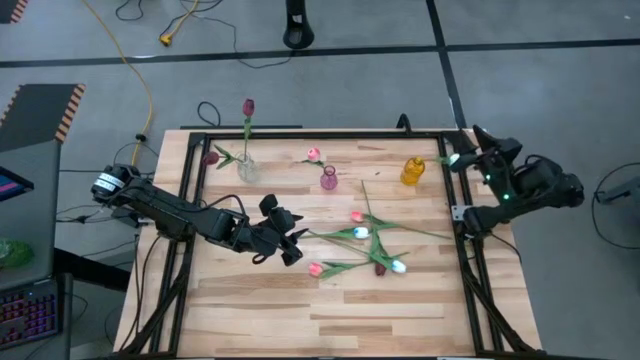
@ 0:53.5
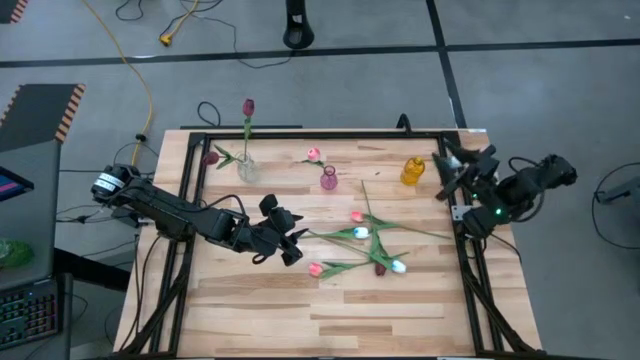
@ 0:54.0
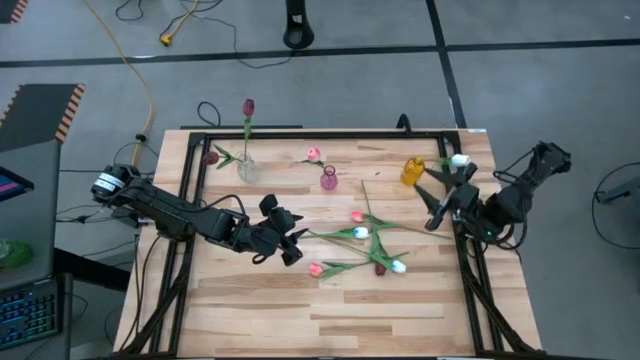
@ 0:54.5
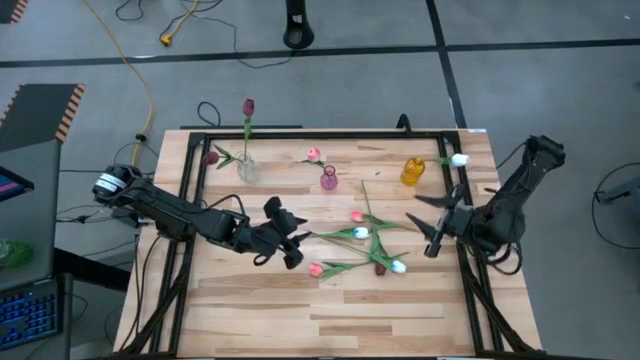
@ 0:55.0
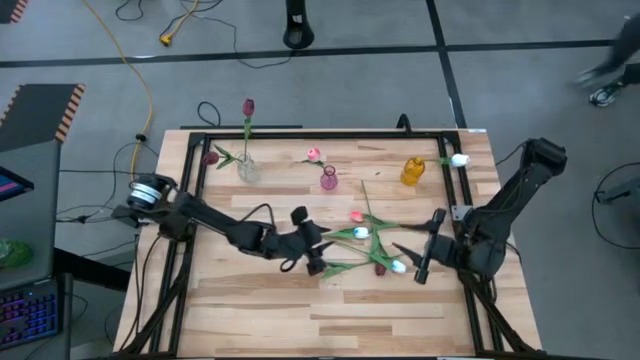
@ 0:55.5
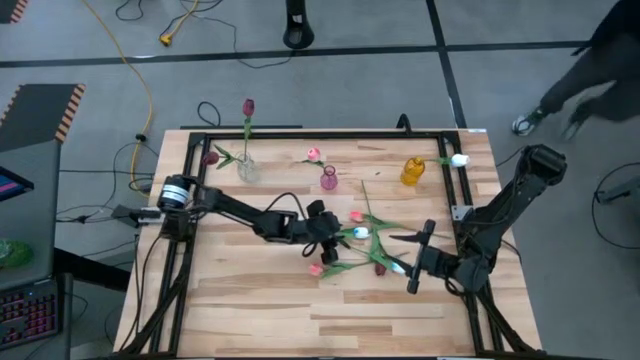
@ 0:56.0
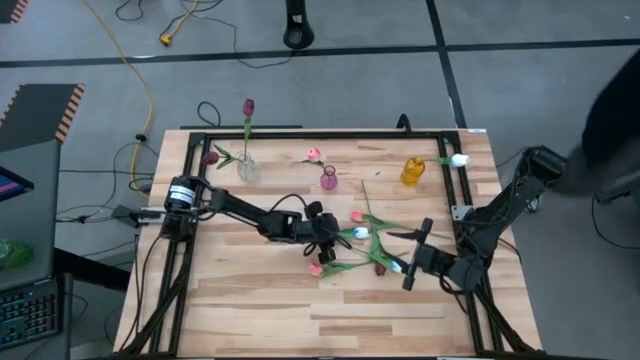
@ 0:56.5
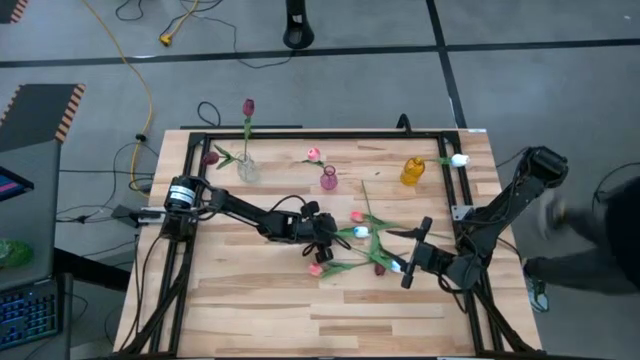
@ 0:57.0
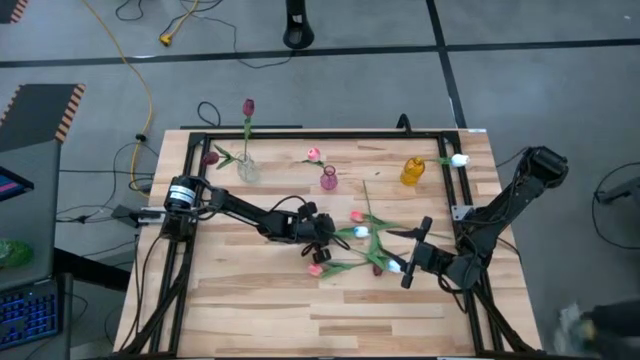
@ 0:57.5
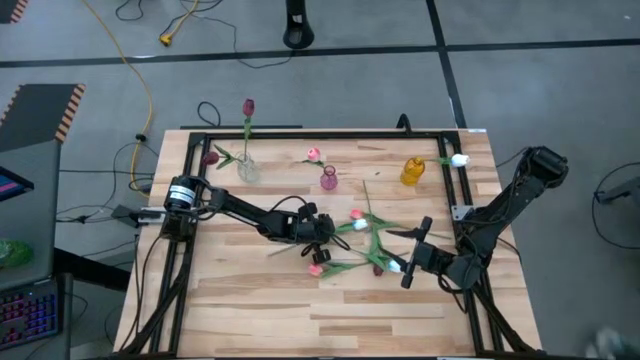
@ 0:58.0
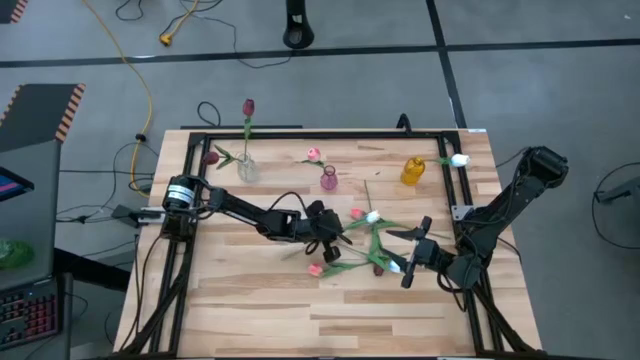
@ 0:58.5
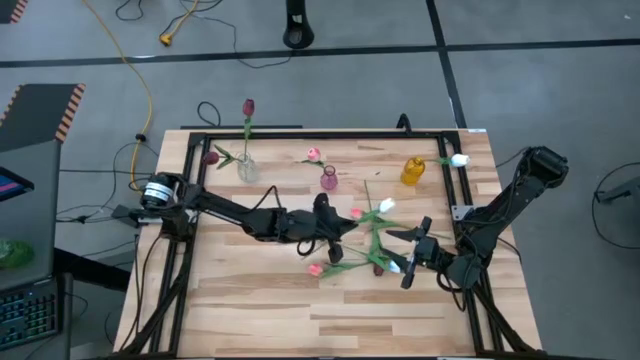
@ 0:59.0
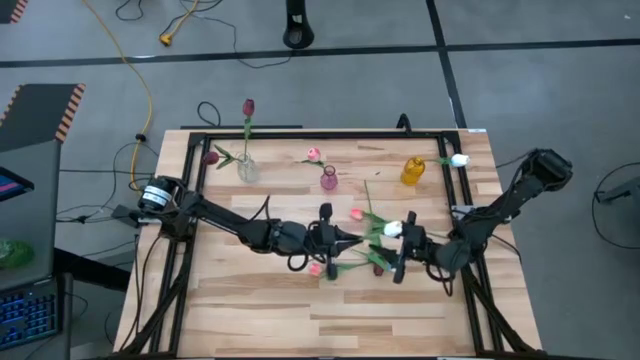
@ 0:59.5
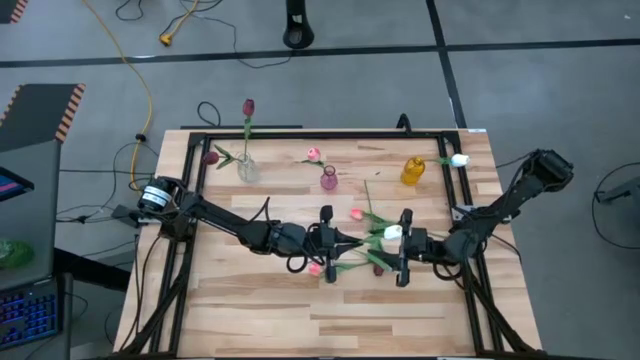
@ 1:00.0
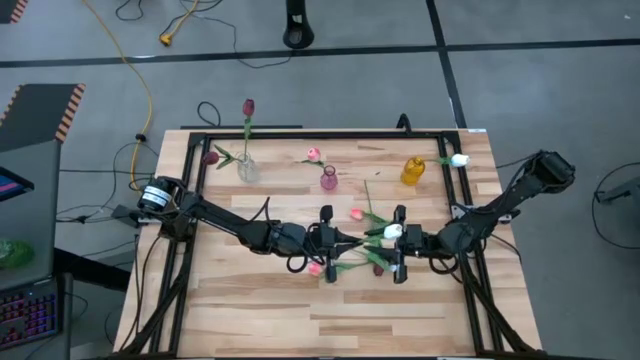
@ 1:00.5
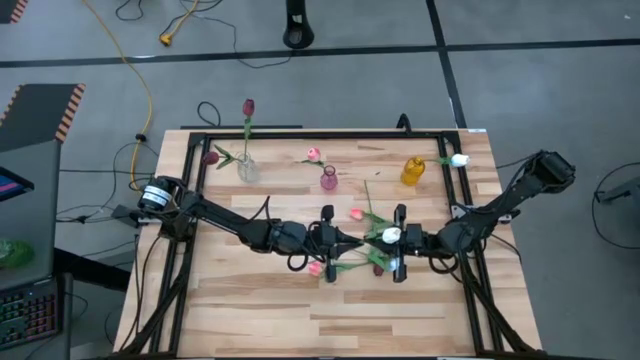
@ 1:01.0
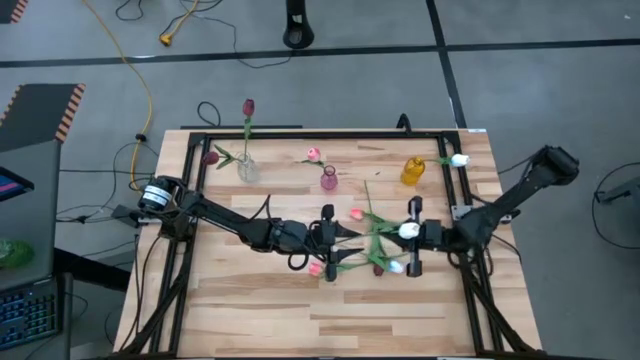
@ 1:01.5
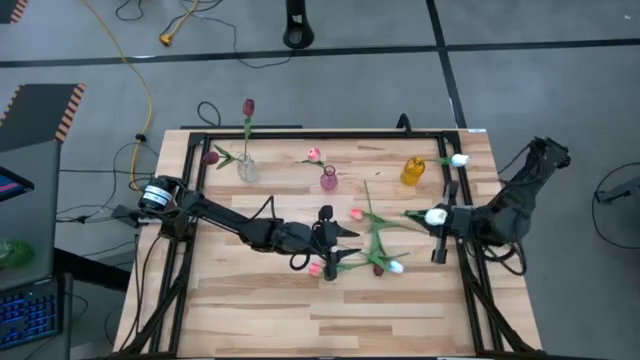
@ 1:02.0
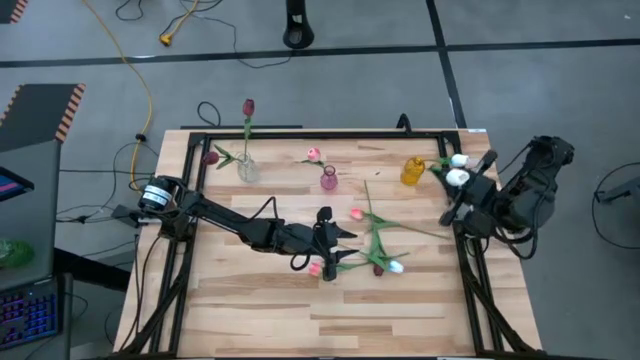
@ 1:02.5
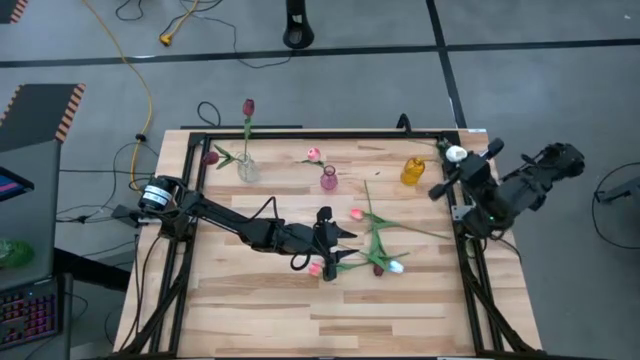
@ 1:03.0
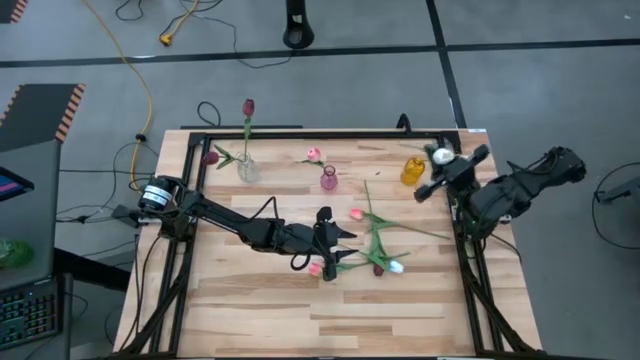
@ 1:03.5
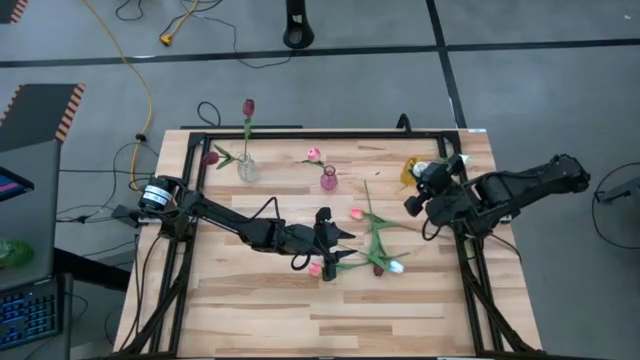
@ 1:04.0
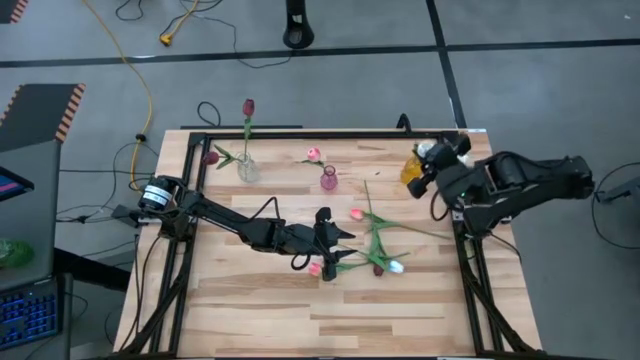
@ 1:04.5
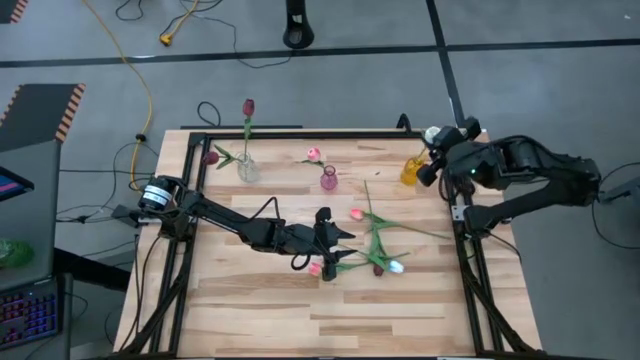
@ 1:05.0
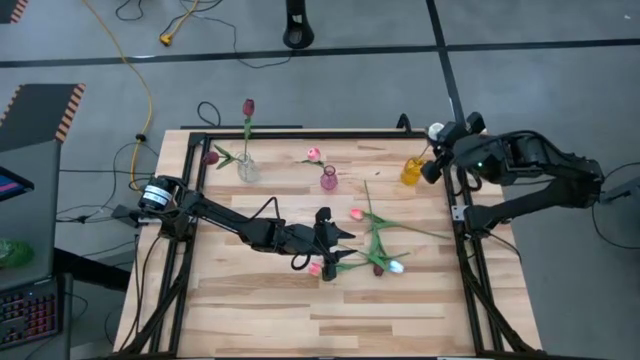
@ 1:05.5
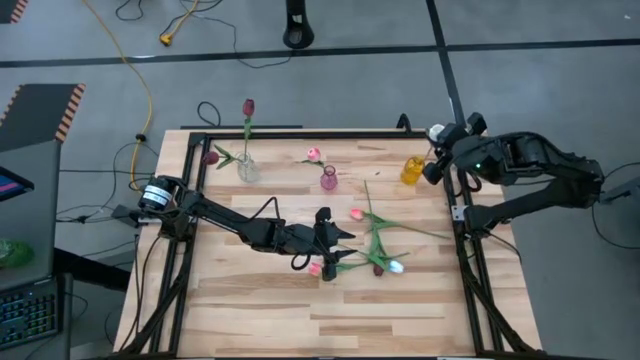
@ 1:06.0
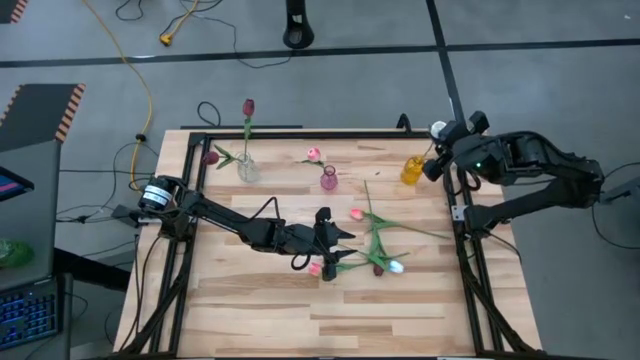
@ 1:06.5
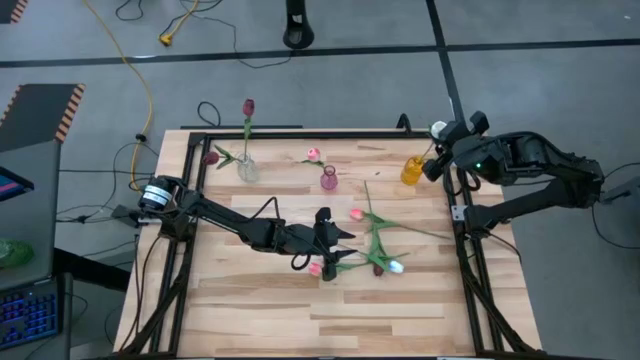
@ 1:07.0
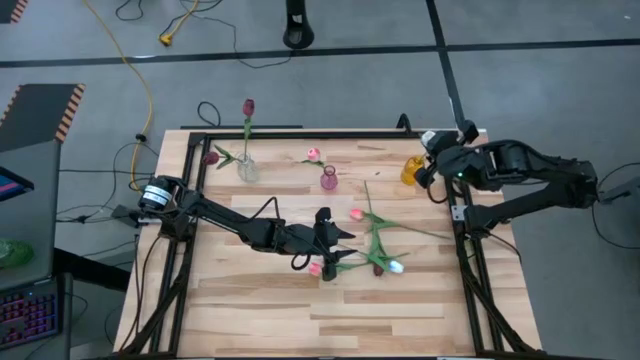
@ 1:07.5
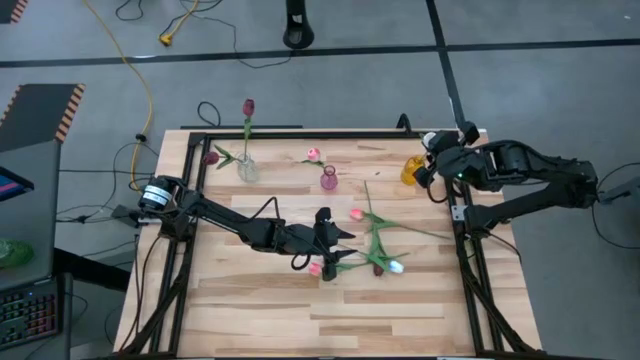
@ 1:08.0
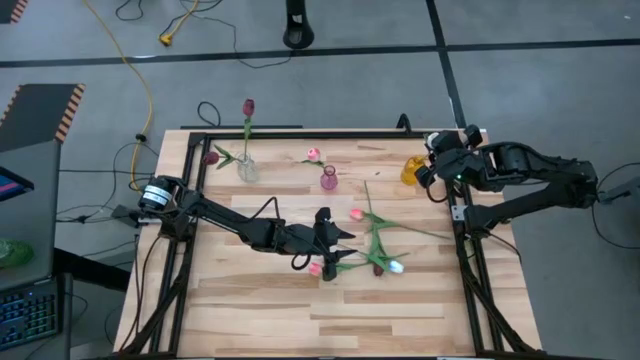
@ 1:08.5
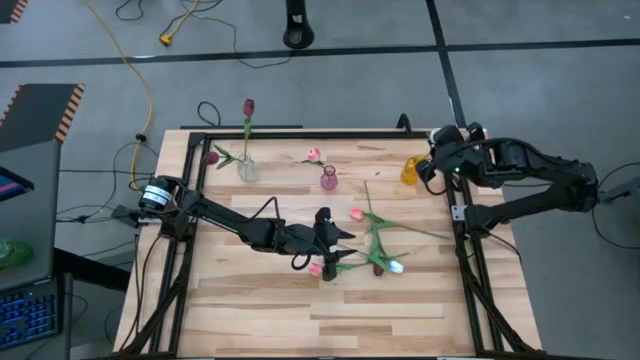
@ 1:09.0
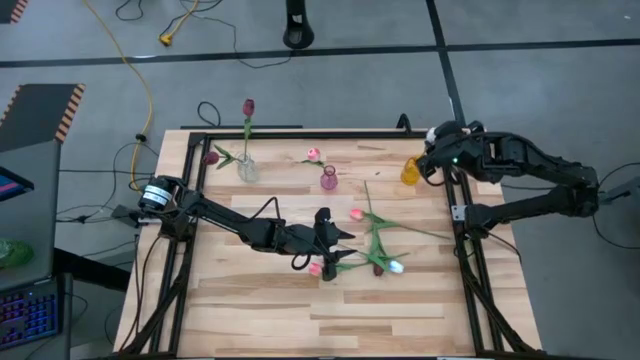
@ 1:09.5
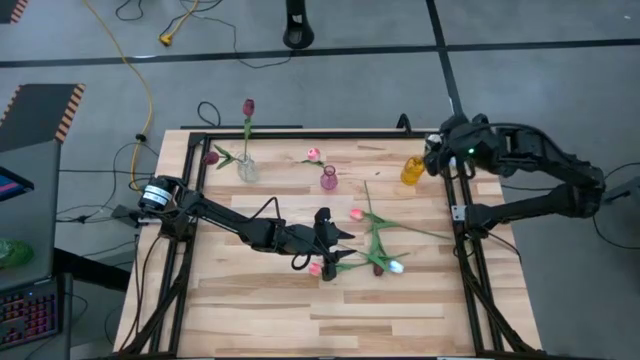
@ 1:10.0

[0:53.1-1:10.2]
Task: Sort flowers into vase by color
Put the top white flower into the yellow vase

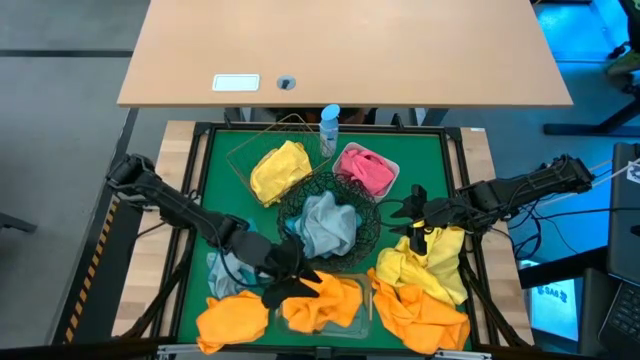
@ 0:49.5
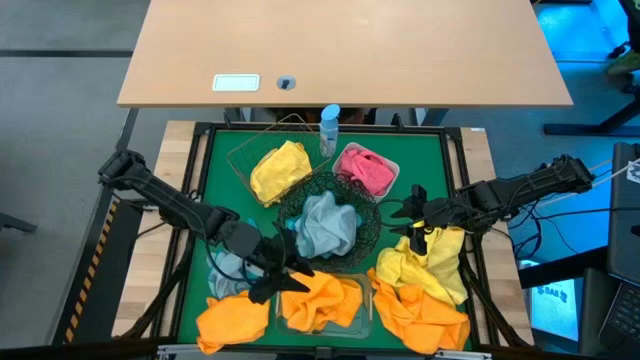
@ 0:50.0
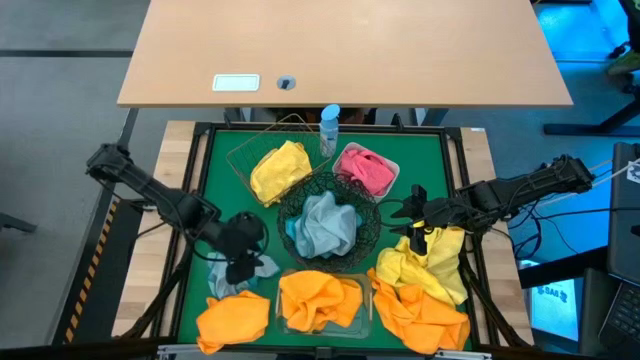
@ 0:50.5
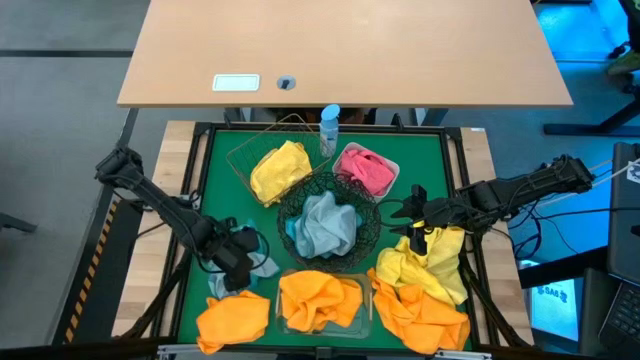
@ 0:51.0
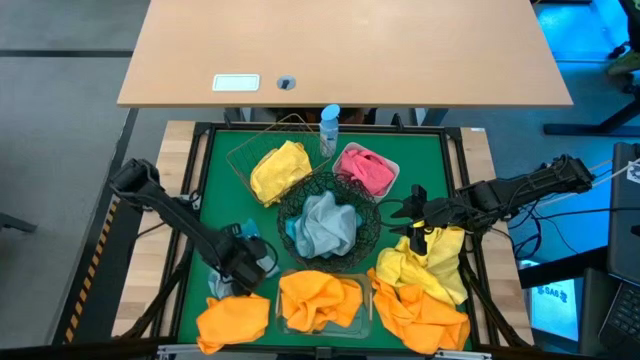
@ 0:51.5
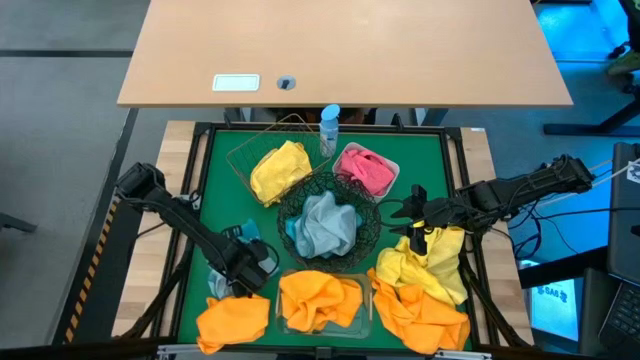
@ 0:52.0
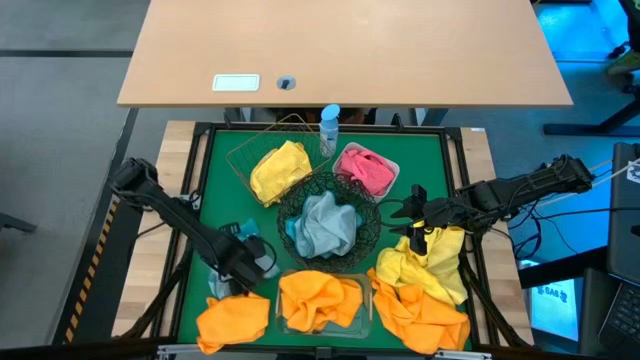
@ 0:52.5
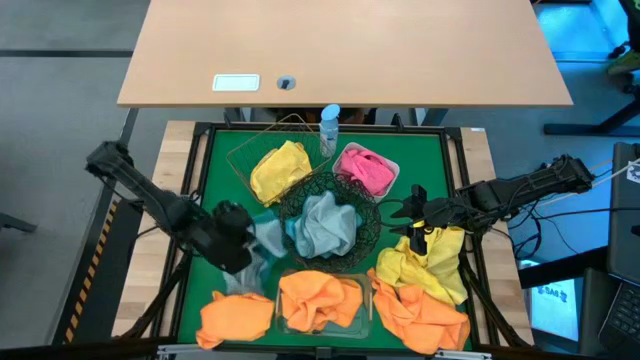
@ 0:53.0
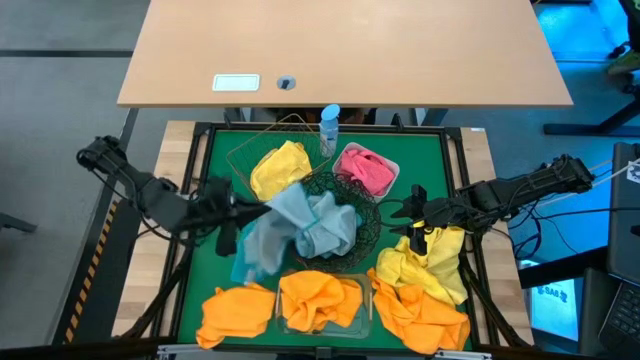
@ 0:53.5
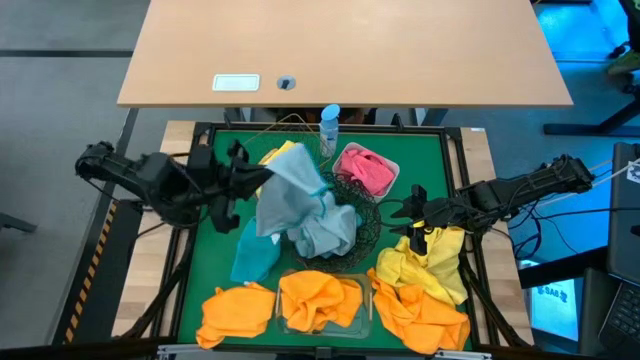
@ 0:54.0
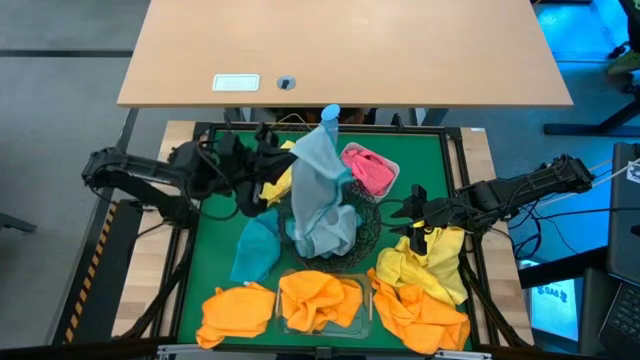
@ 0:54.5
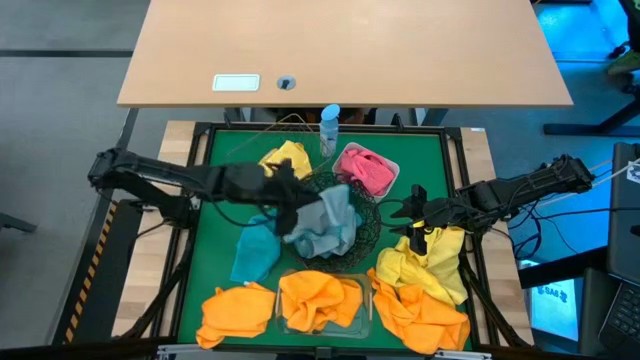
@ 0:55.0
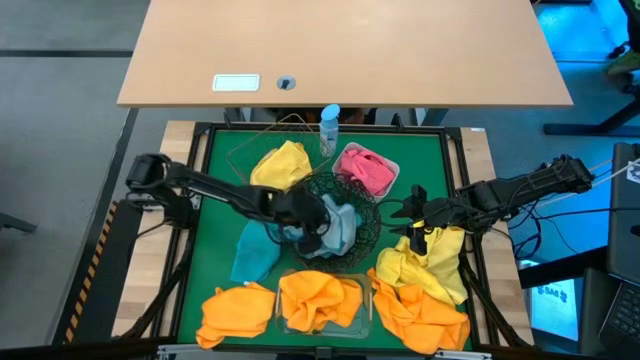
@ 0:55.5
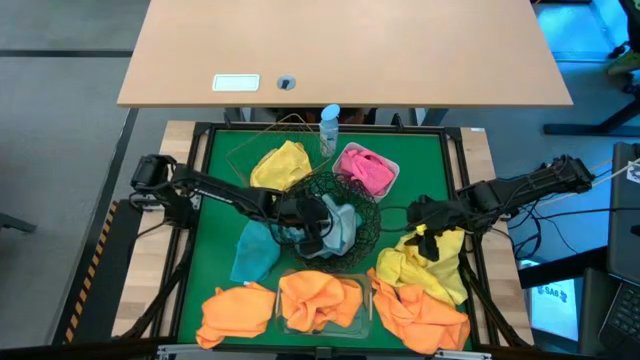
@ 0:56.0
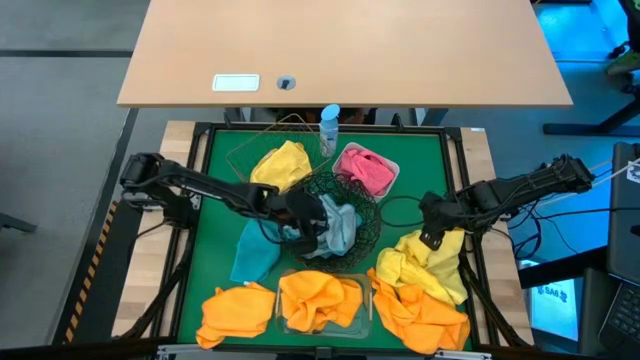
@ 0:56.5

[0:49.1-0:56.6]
Task: Sort microfiber towel by color & place in baskets
Put the blue microfiber towel into the black wire basket
